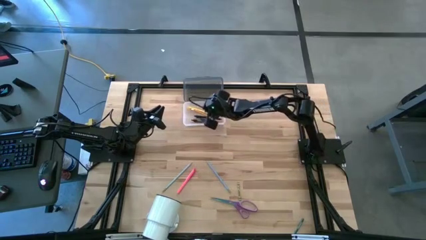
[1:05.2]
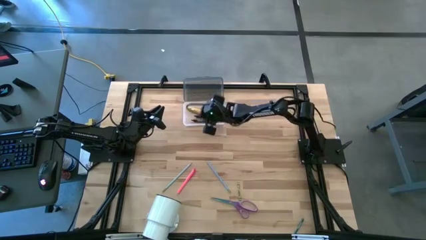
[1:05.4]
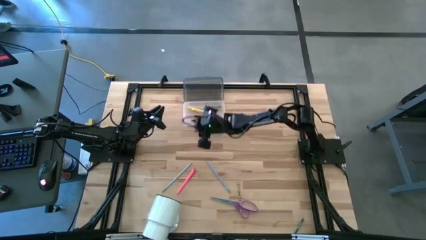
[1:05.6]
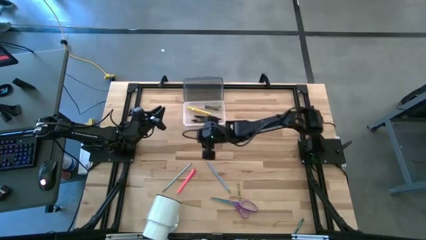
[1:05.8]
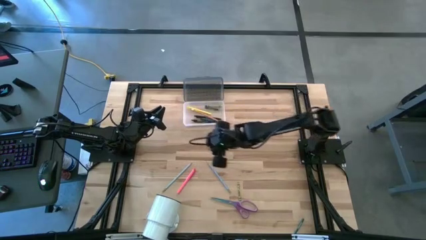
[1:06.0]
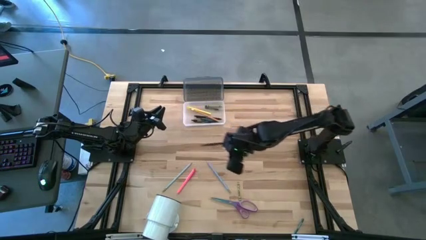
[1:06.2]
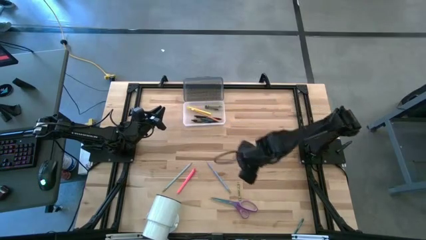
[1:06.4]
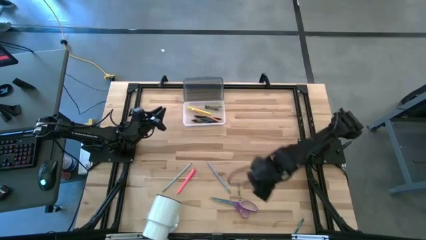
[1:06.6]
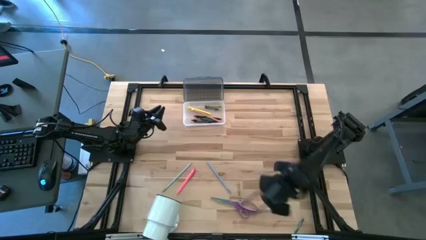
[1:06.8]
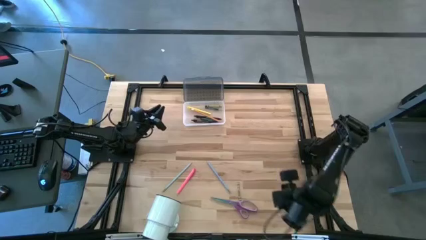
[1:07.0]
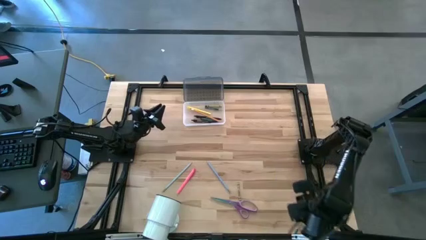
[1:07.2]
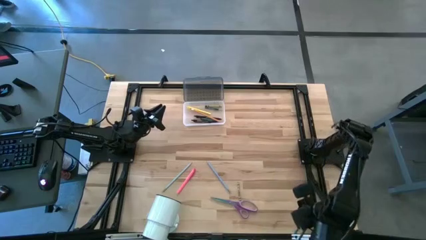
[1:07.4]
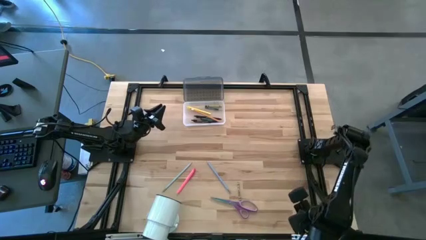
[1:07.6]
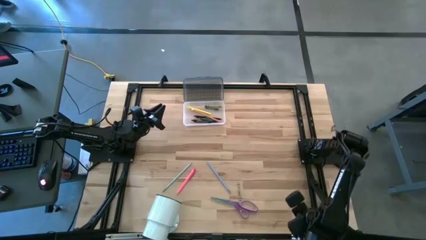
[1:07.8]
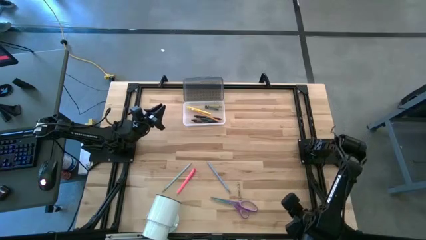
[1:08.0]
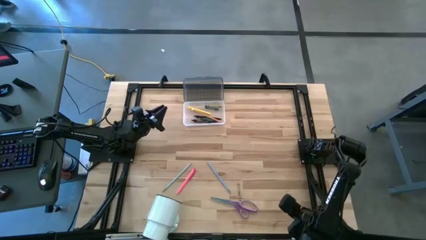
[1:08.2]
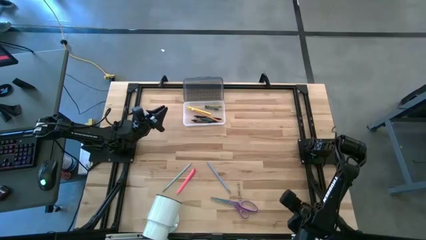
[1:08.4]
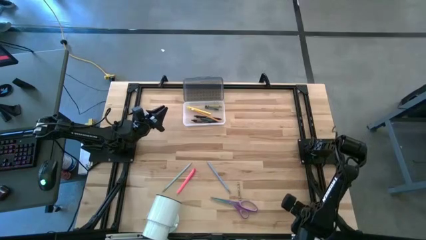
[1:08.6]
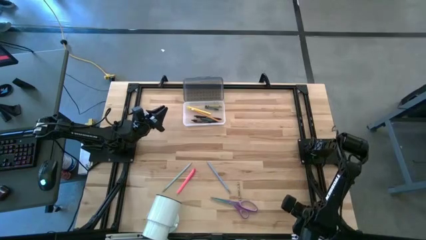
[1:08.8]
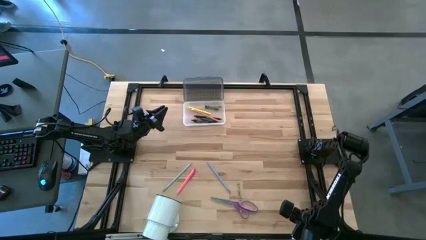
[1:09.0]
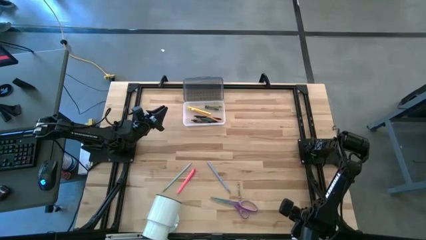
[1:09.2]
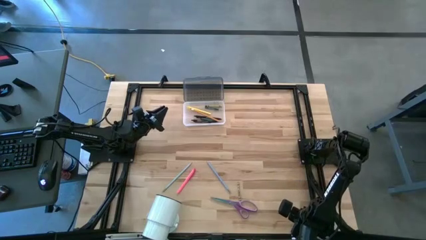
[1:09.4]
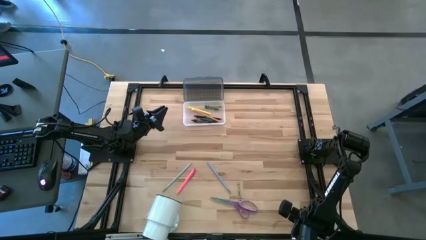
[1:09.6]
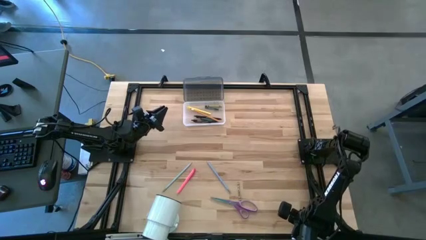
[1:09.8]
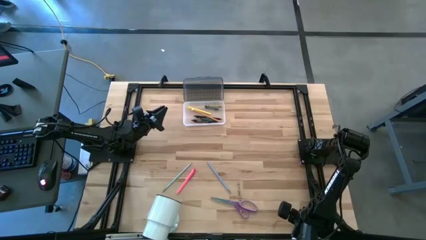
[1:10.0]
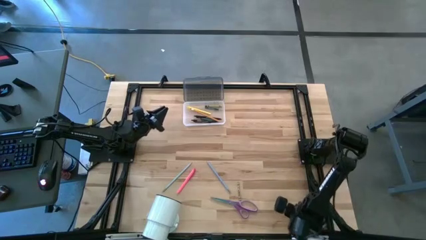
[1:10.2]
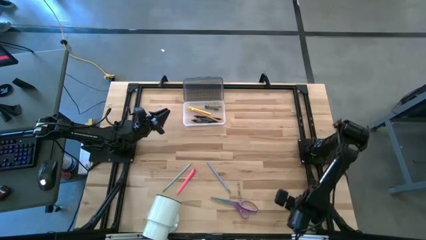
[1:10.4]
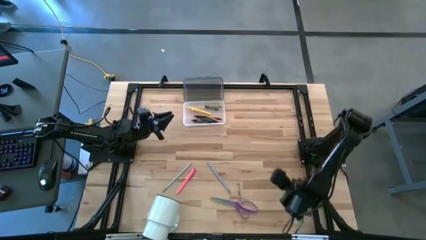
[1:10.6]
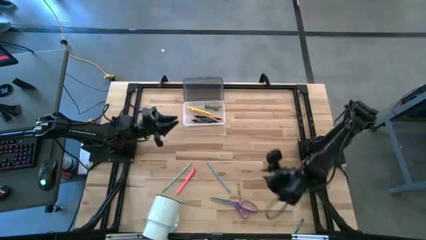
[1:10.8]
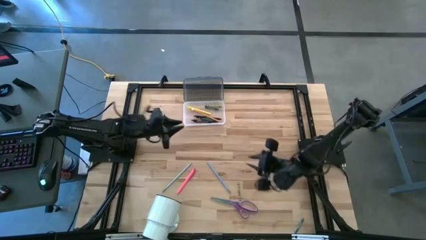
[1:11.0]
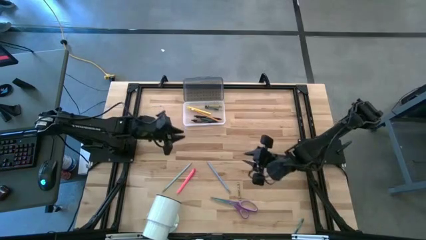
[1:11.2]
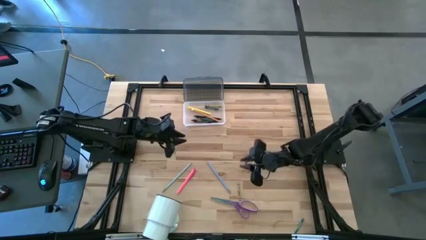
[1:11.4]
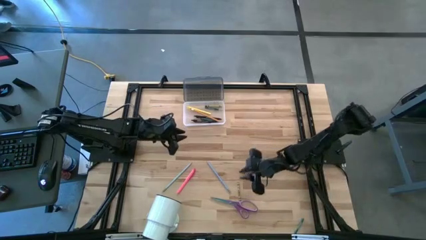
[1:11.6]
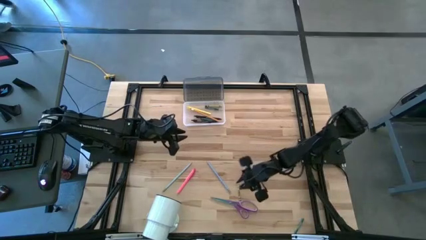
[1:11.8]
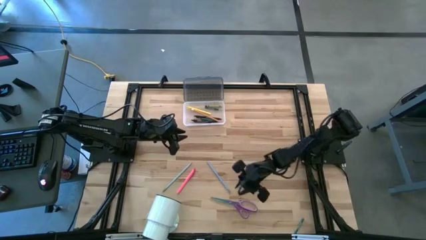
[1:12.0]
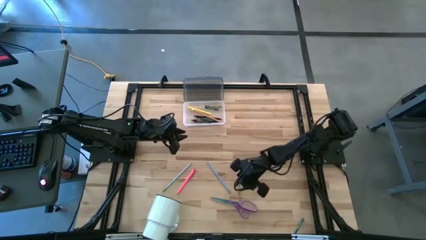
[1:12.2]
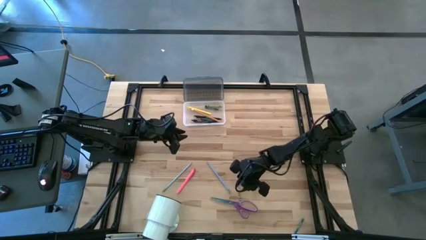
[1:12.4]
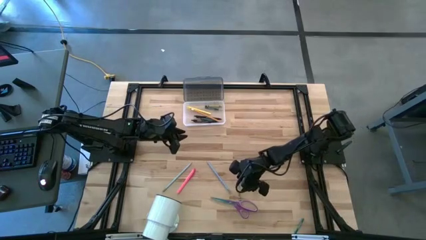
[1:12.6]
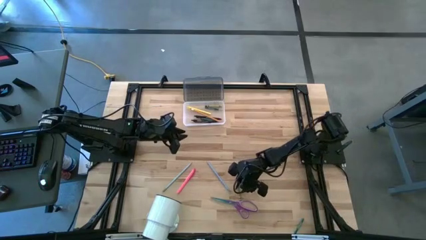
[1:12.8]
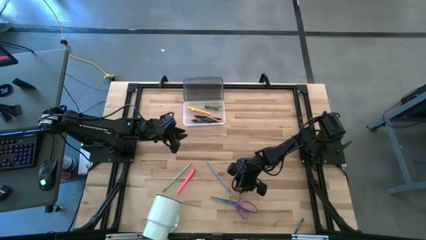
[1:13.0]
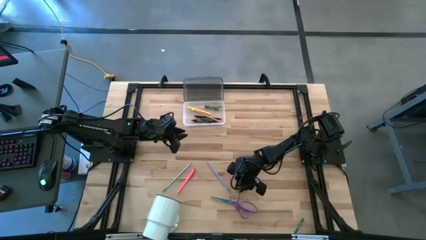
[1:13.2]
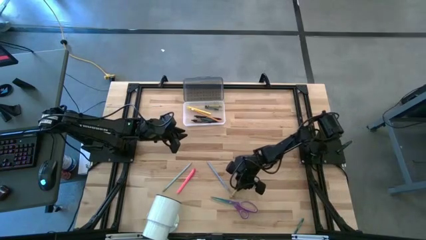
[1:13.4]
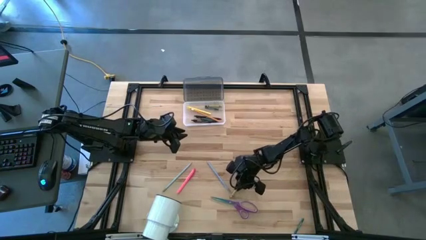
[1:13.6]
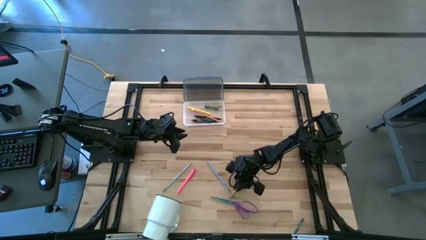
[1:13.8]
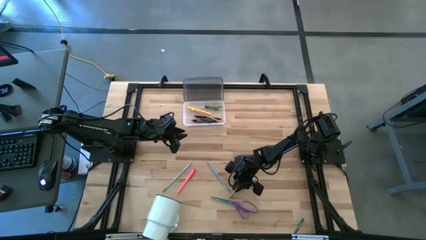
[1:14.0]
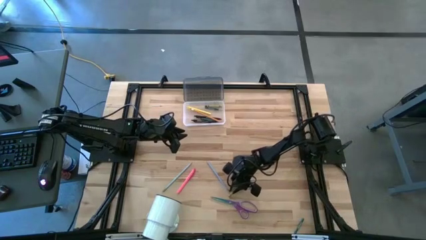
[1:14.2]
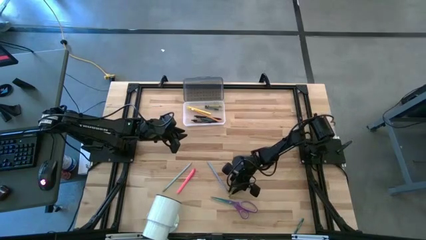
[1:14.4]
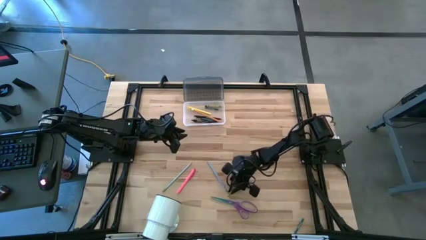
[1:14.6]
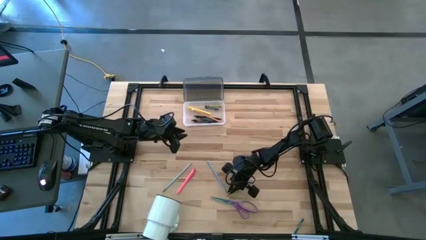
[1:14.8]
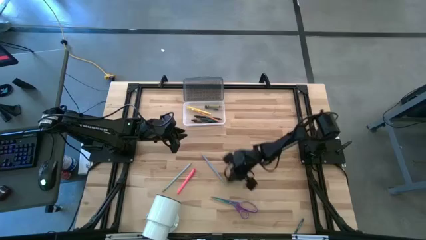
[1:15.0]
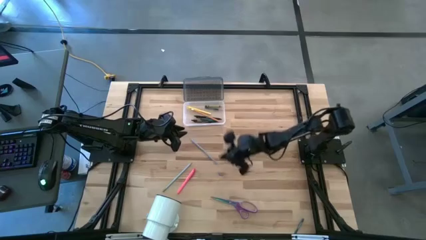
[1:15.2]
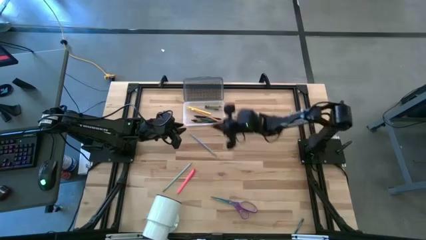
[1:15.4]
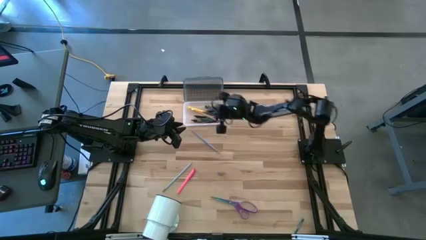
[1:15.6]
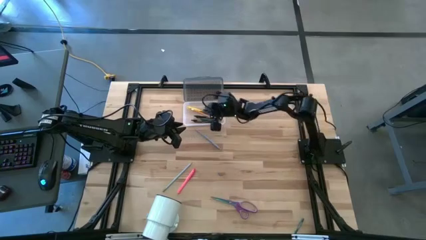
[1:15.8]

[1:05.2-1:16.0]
Task: Pick & place school supplies into a supply box
Put the green crayon into the supply box

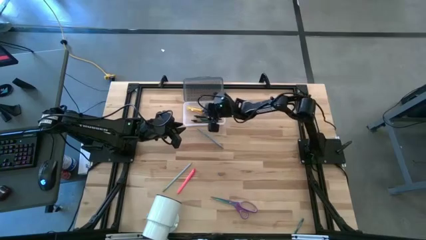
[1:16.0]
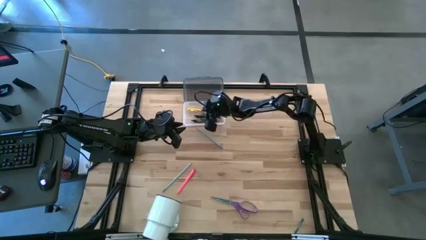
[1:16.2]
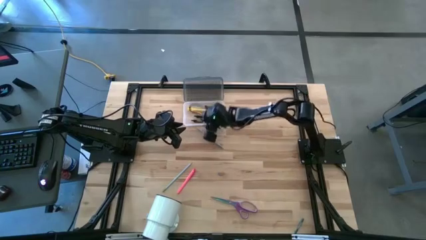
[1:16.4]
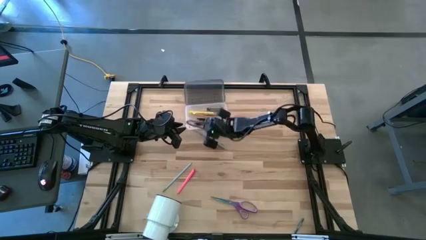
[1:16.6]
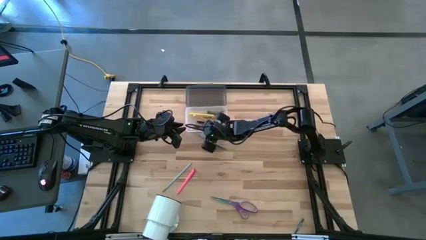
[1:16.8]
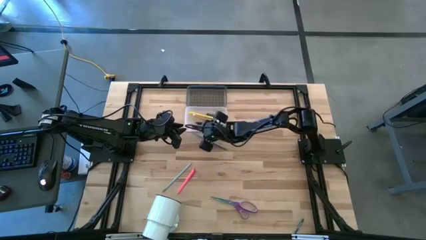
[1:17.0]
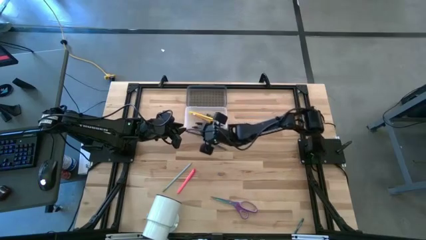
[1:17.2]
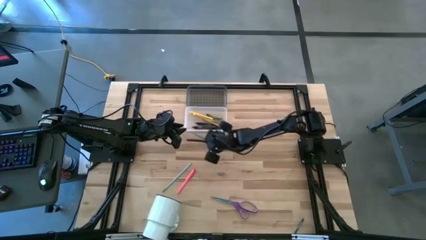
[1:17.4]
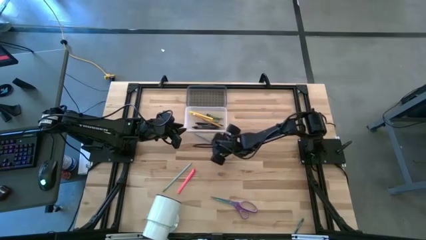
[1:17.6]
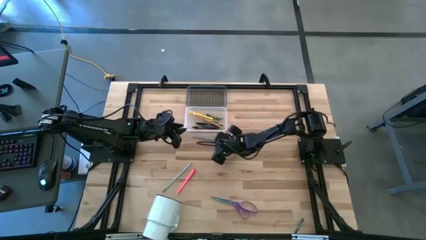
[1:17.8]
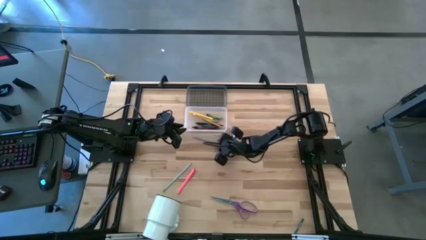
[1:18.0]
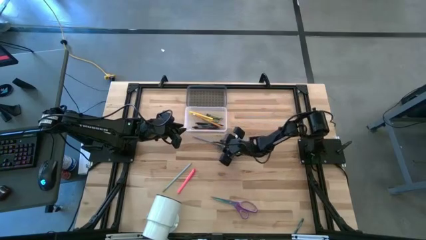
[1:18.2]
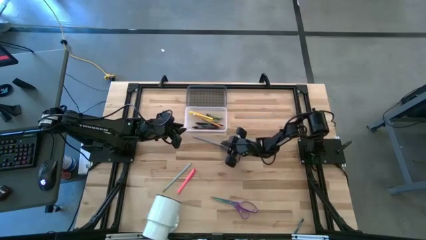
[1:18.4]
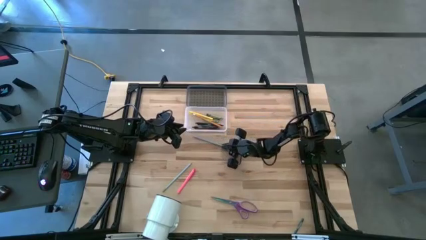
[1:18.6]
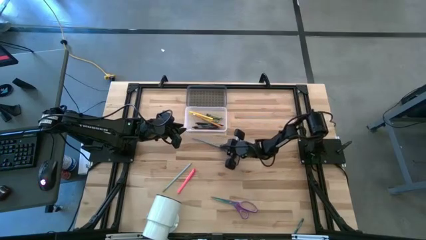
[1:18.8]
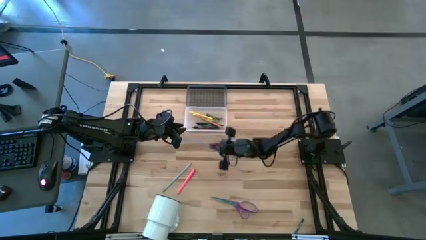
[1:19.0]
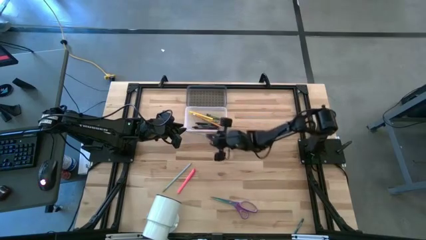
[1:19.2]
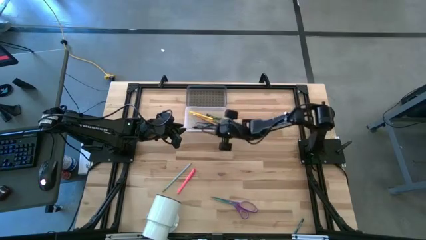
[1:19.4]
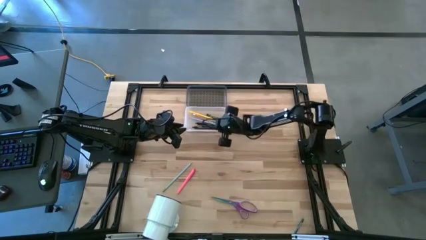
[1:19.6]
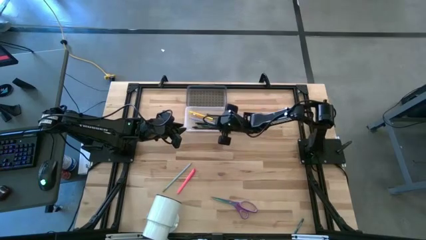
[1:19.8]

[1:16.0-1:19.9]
Put the top blue pencil into the supply box

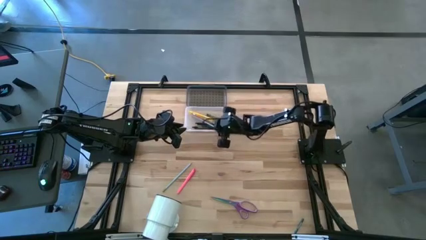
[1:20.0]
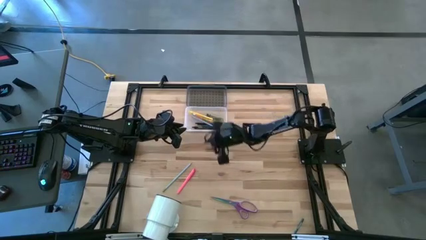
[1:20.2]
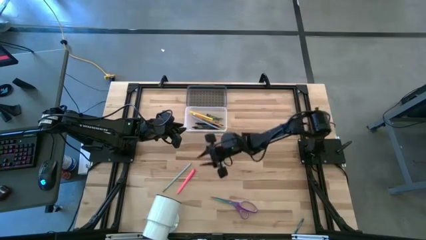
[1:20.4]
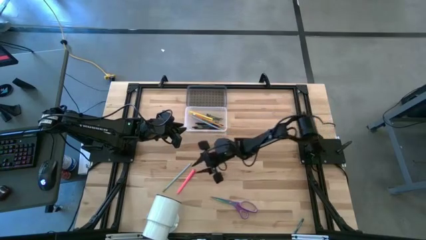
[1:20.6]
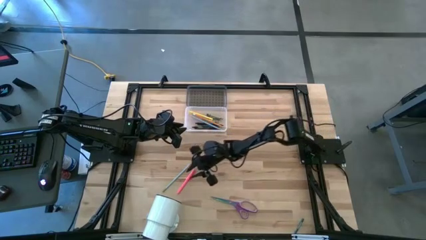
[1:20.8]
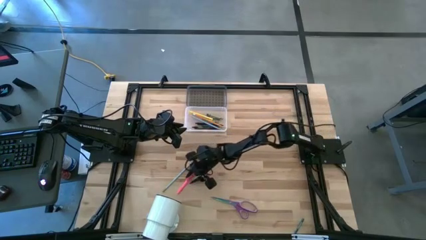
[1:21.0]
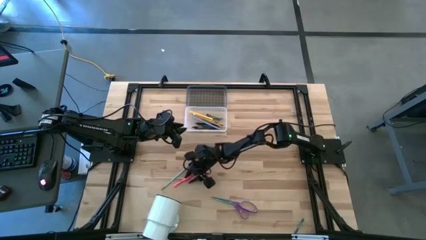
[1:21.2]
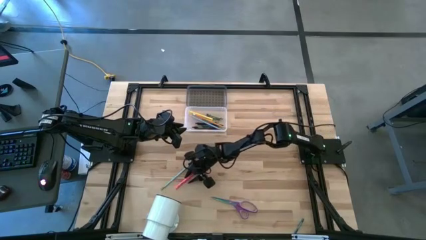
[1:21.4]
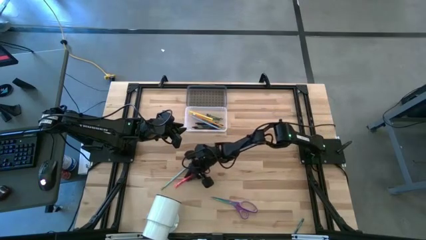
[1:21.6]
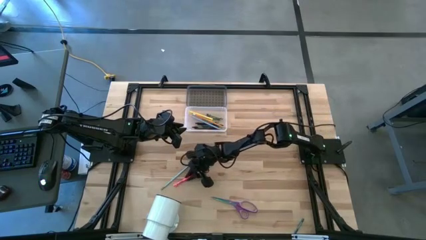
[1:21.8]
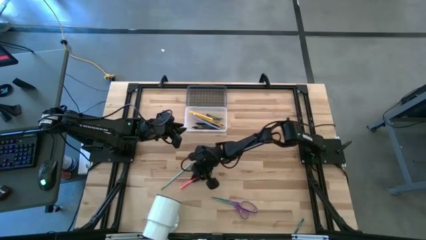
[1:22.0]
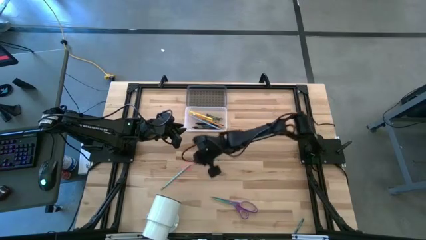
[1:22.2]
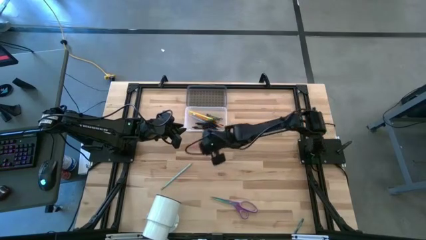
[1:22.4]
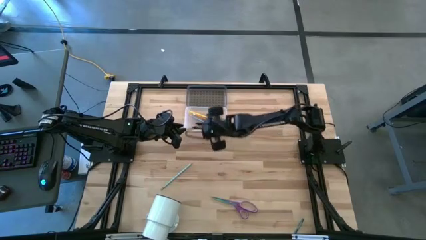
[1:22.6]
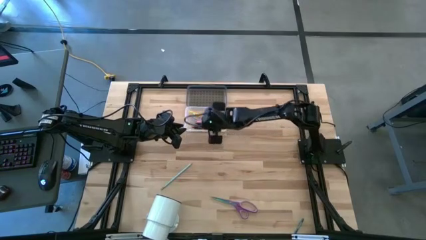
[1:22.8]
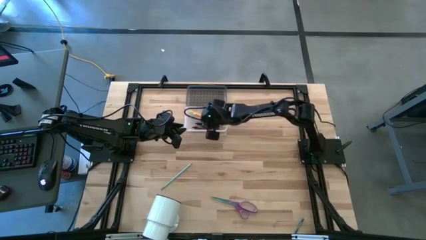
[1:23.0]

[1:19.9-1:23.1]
Put the pink pen into the supply box
